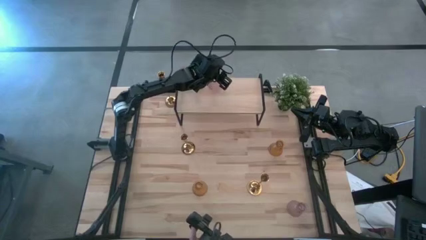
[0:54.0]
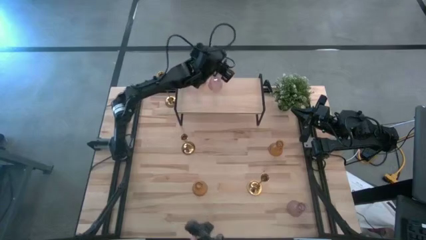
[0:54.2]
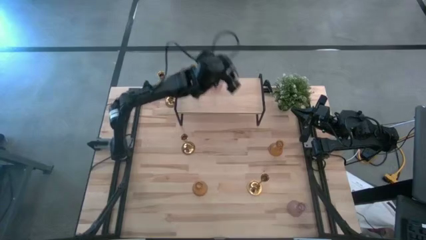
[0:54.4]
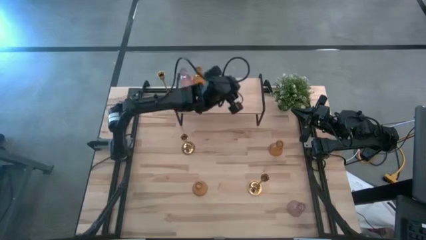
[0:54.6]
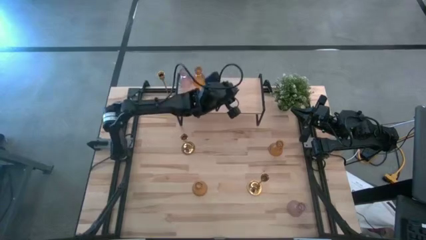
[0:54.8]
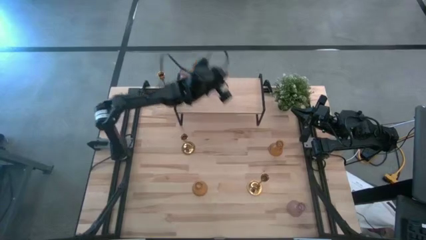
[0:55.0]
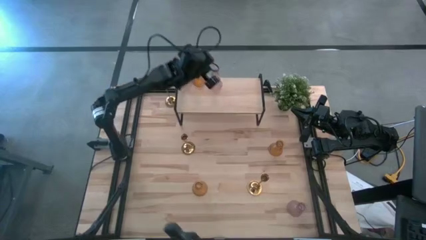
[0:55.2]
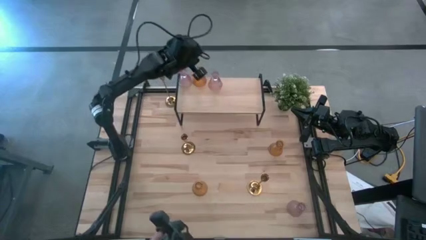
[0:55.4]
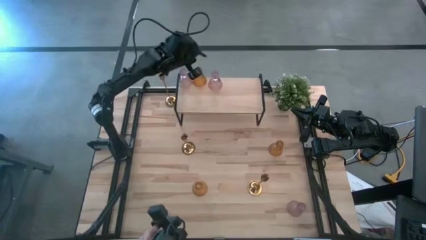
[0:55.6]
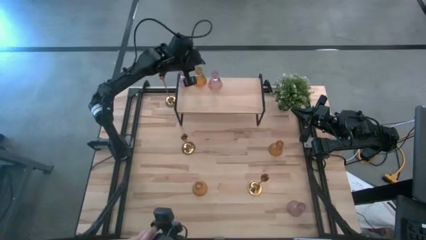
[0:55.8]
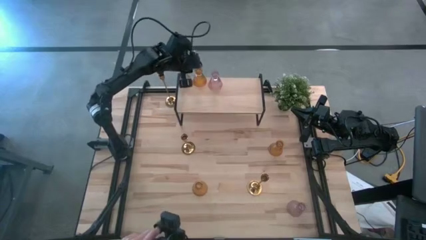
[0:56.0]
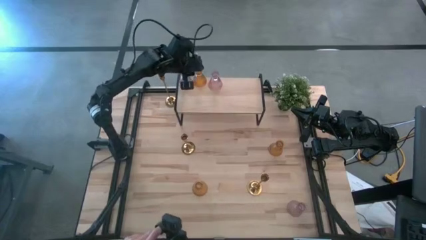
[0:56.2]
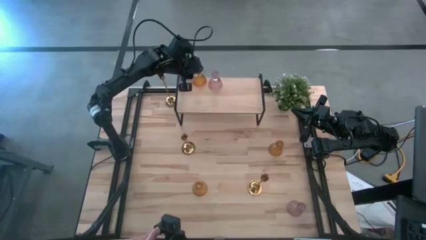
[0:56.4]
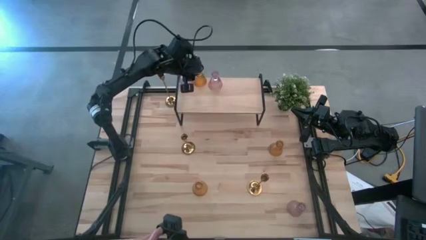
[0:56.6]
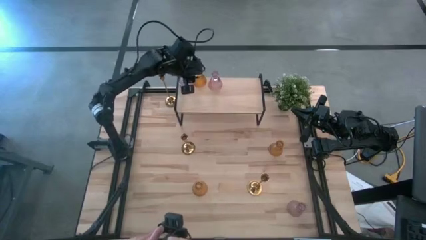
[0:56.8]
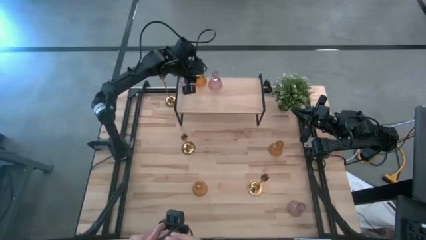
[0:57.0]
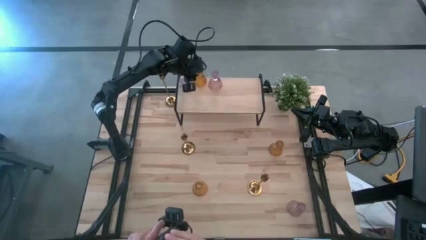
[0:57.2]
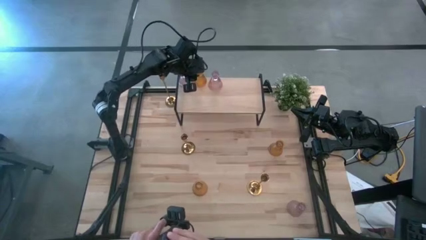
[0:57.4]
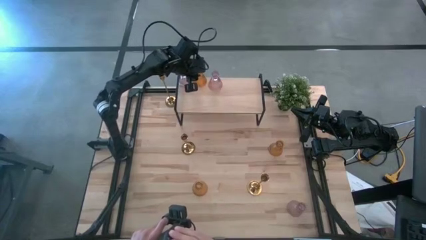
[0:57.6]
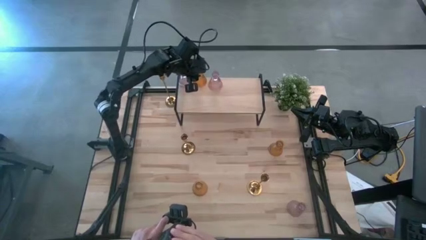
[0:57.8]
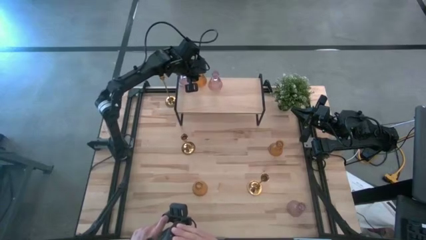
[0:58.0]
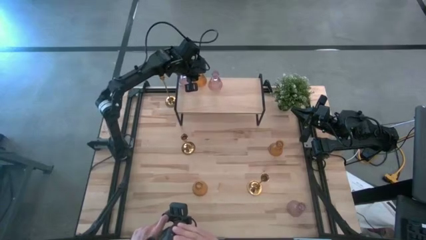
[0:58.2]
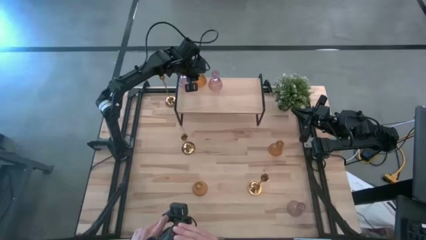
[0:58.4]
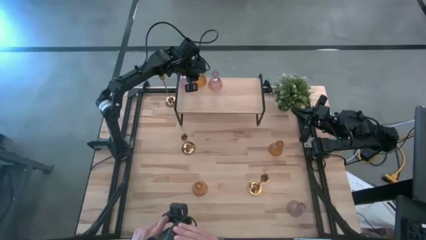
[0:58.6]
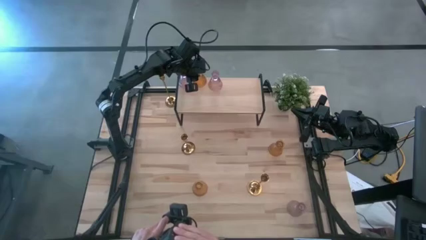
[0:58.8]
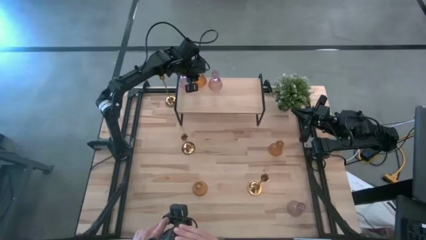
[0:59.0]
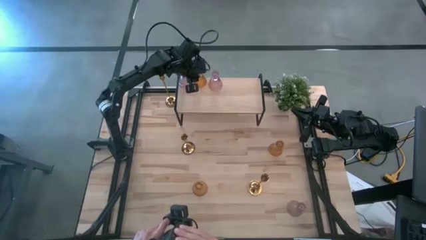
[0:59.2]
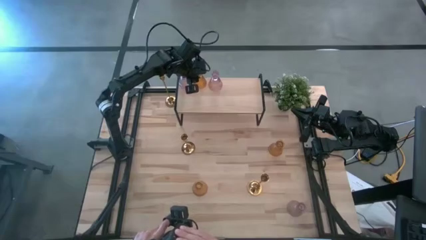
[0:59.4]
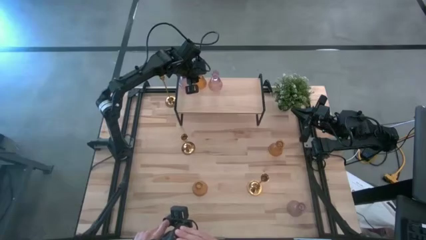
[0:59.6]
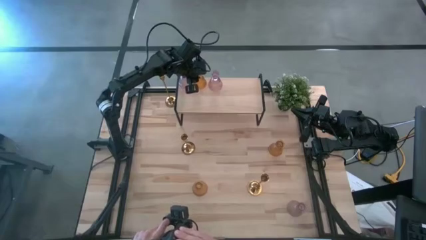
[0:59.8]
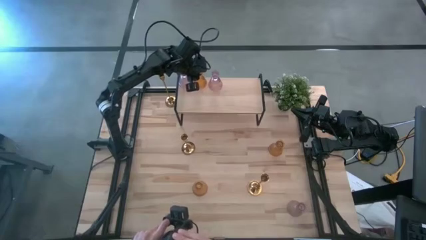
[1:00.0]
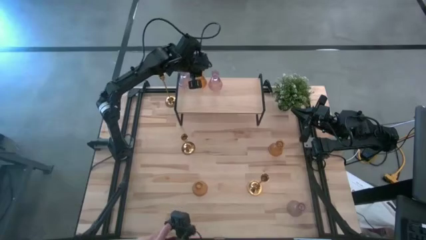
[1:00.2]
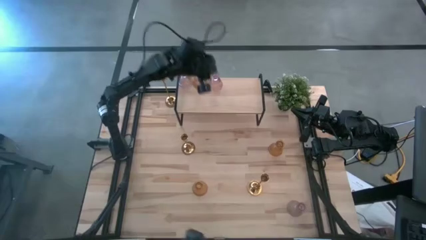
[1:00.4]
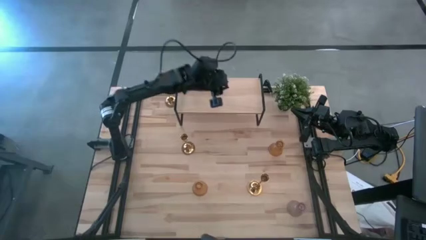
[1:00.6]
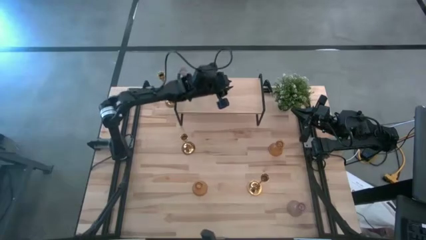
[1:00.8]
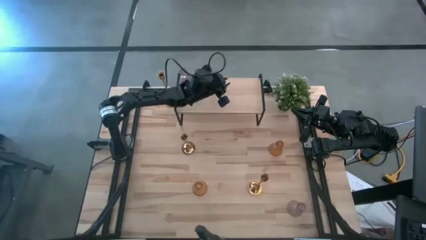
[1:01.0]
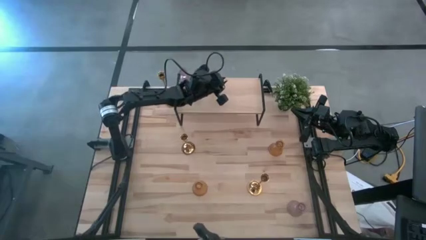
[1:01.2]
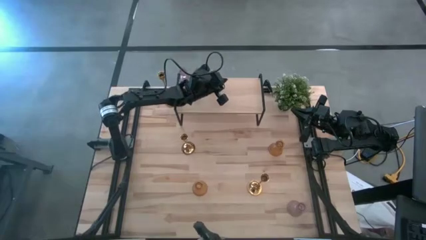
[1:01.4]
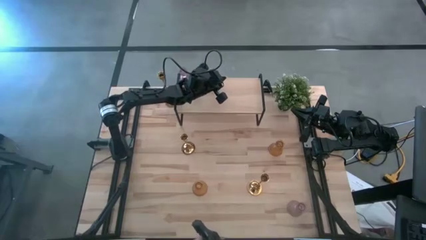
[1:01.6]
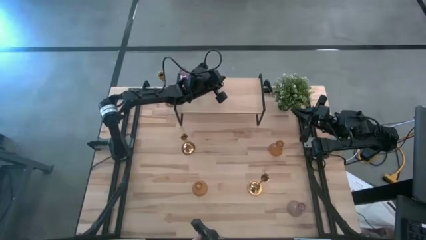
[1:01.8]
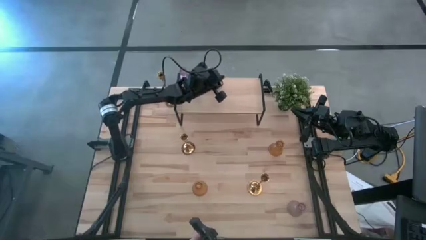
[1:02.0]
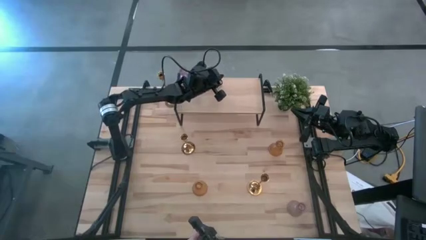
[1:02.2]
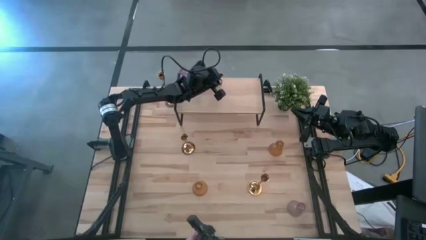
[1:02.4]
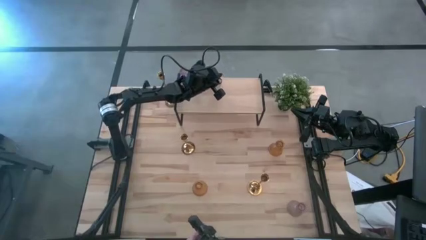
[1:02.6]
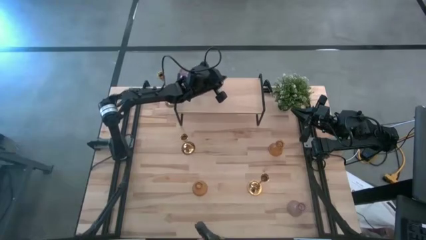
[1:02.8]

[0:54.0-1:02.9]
Task: Pick & Place candle stick holders
Adjust the glass candle holders on the shelf

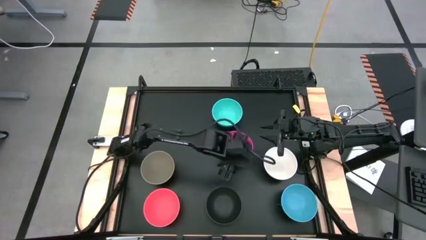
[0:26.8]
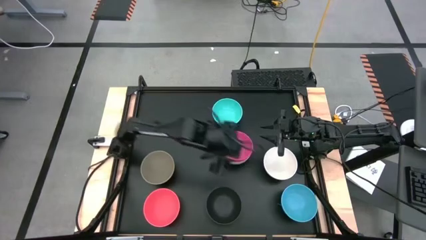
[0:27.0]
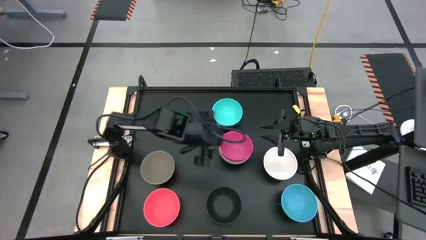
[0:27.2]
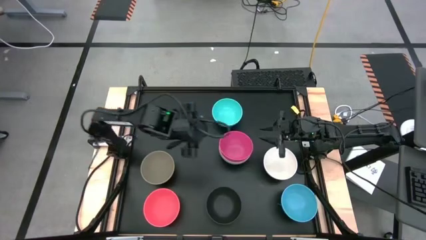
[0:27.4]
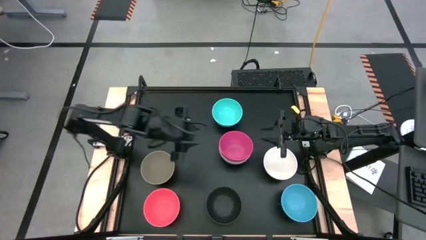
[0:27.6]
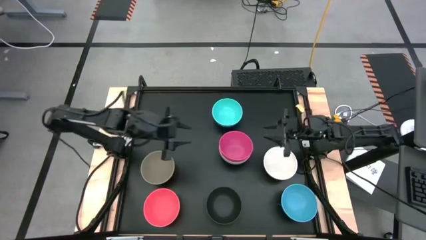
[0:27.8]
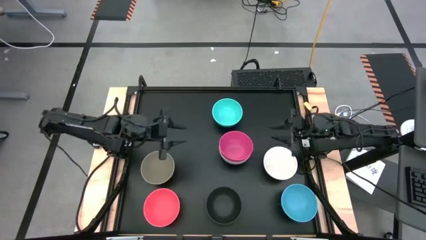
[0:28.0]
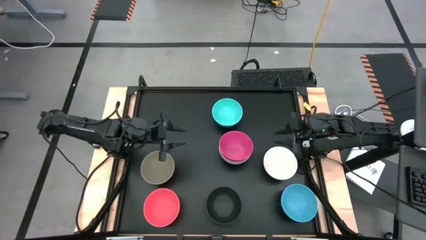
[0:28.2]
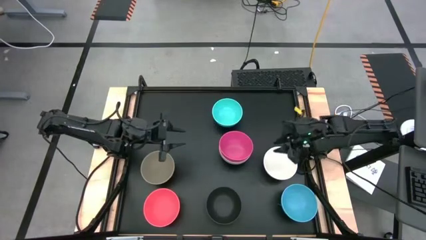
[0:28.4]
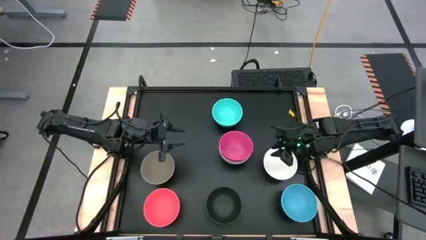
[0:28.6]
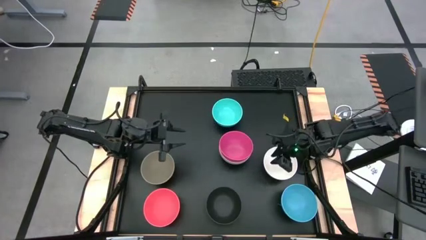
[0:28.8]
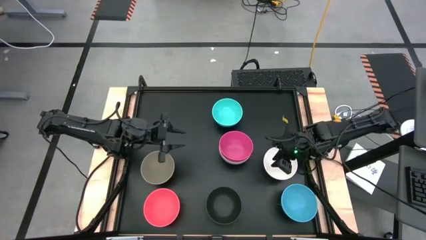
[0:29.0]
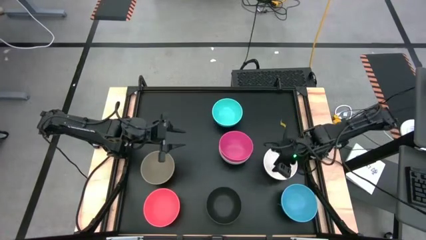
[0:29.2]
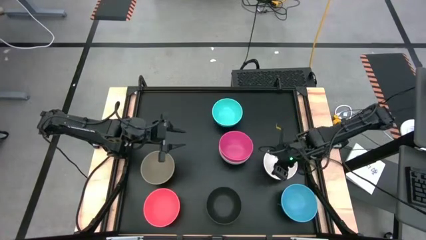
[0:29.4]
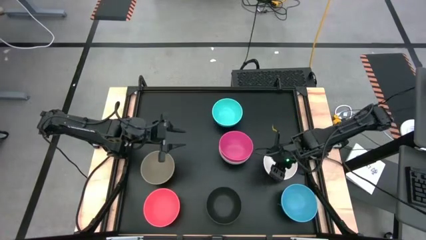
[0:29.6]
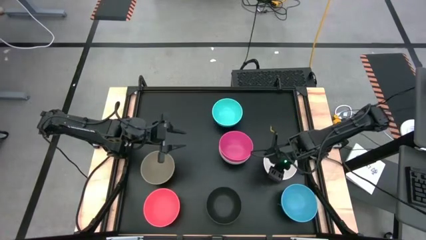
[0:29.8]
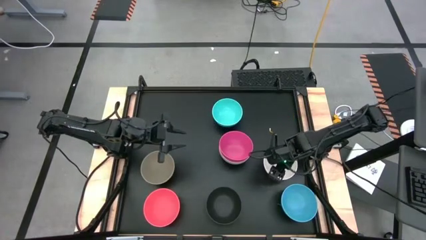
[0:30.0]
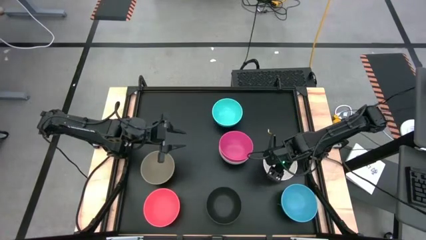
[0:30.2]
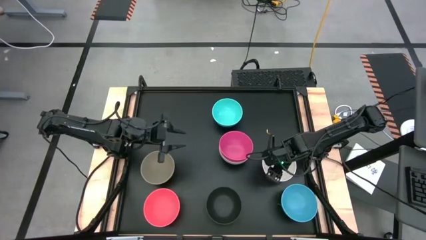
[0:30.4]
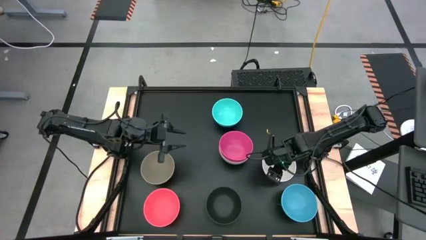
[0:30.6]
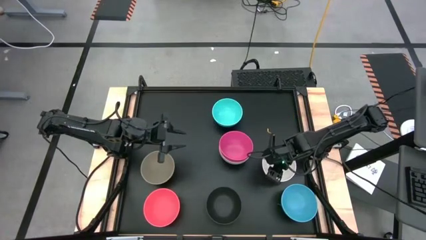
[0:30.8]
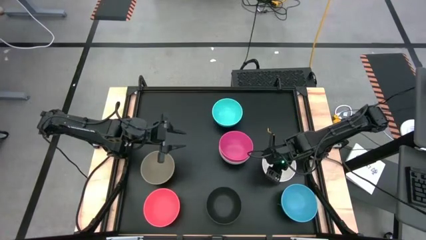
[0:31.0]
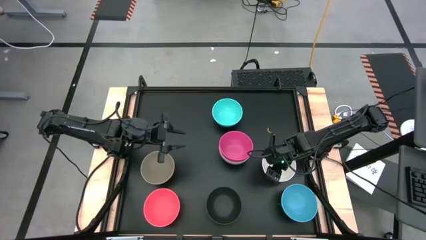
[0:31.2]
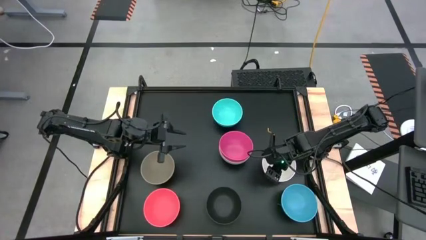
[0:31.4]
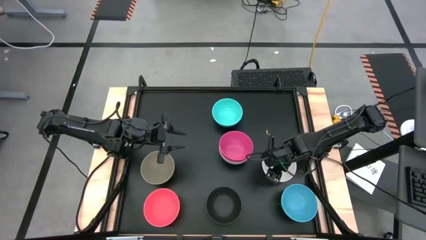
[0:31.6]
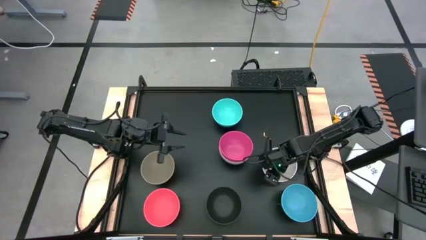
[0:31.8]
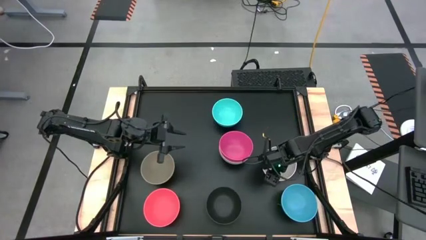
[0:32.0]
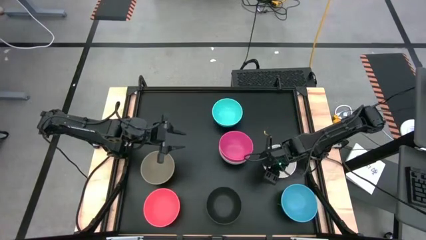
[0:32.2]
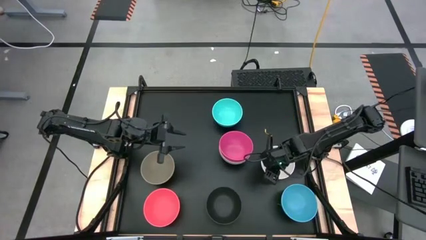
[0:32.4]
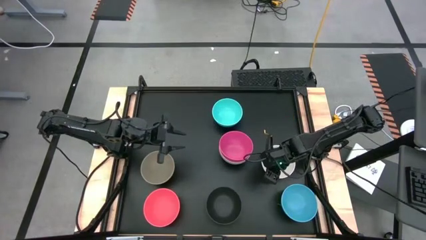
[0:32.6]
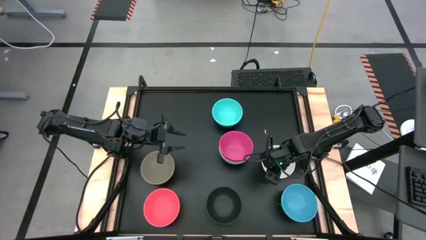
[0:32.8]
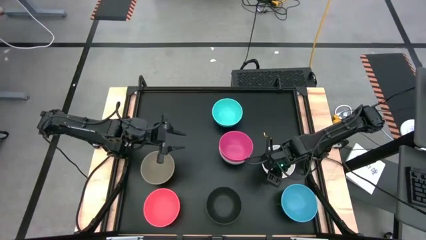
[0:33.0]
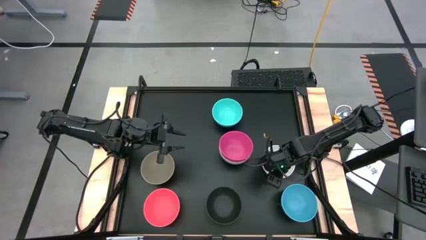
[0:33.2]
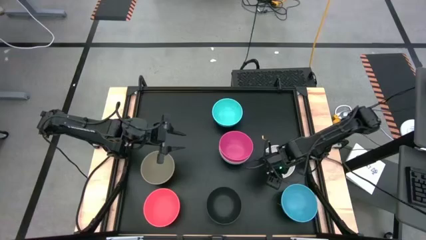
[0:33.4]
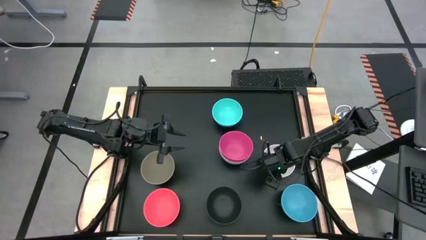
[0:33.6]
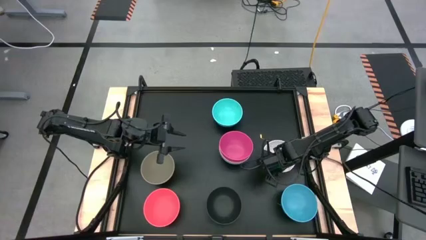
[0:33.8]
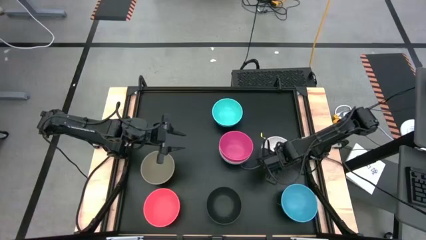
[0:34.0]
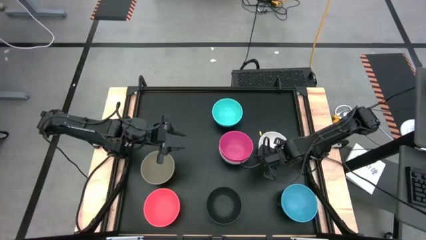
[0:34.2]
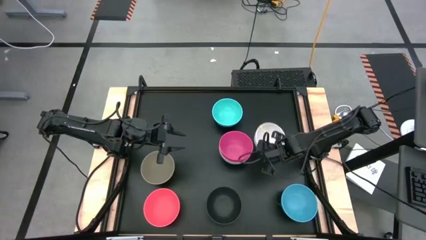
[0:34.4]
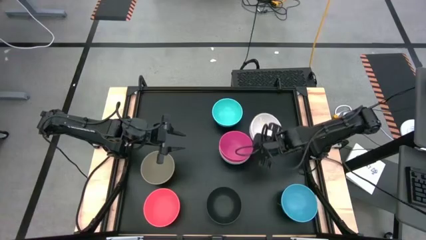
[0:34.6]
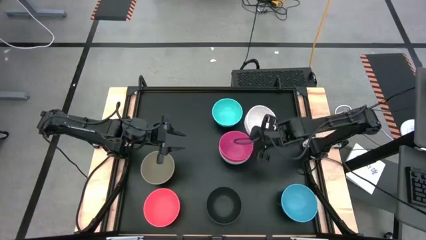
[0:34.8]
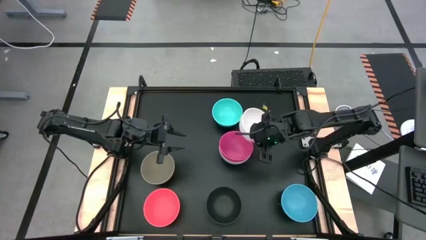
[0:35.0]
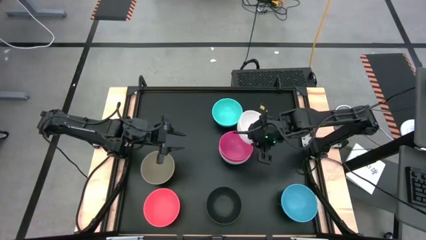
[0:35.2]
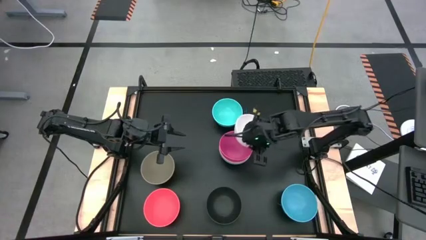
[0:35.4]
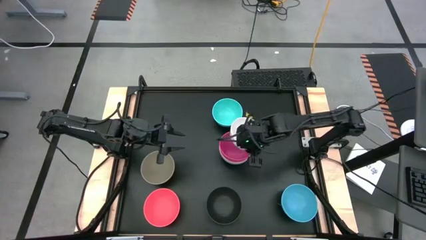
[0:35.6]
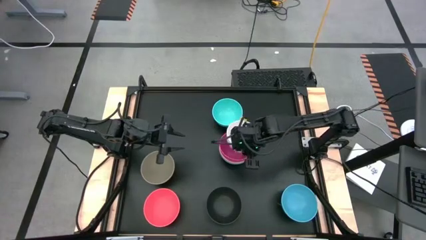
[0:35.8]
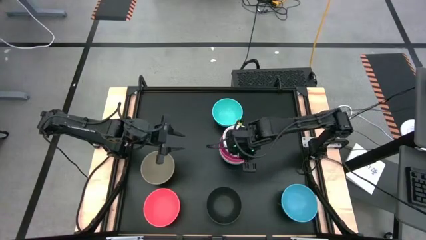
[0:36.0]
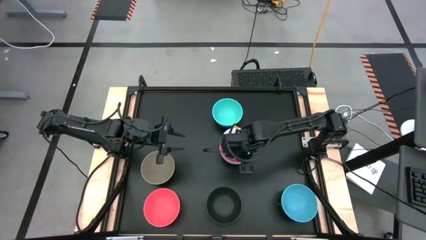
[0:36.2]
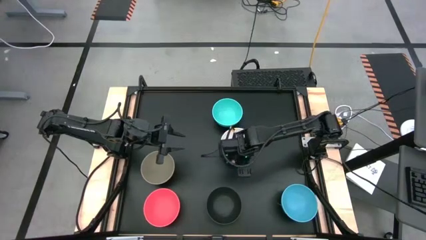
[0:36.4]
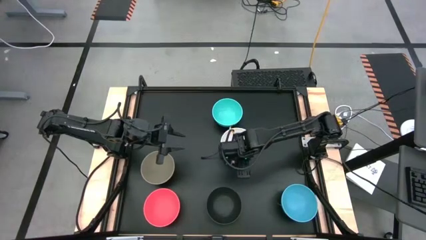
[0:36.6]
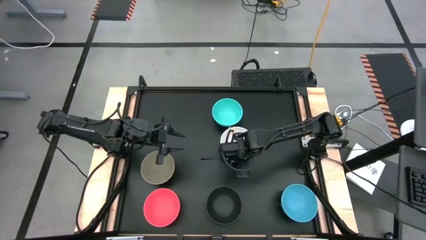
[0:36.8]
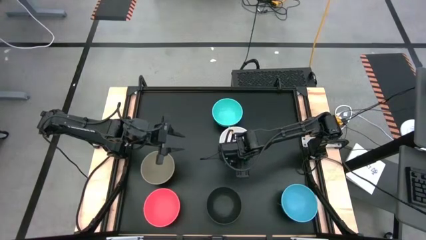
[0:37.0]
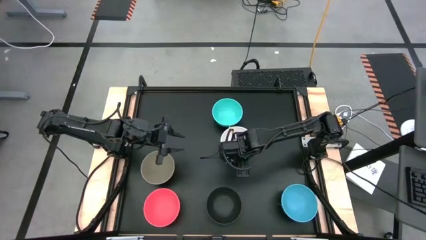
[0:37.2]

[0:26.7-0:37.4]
Task: Nest bowls inside each other
Stack the white bowl on top of the pink bowl
